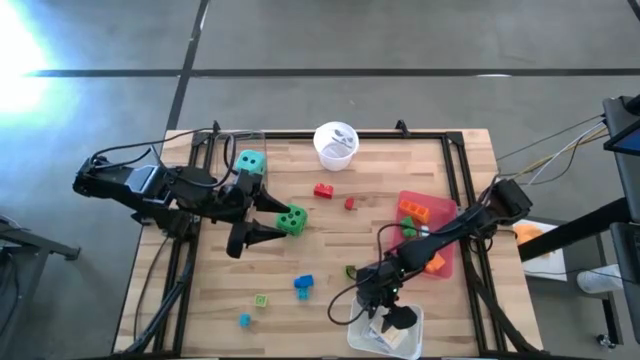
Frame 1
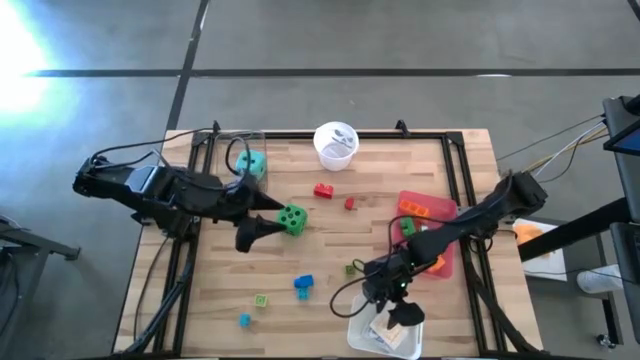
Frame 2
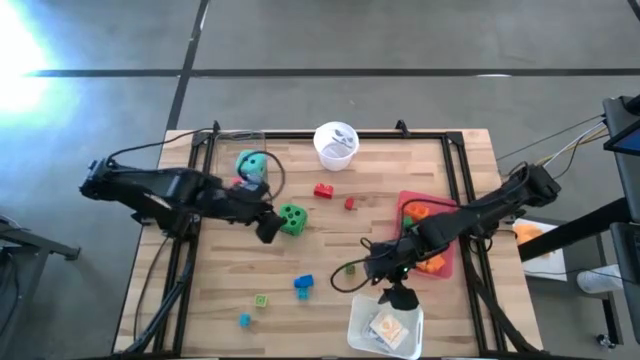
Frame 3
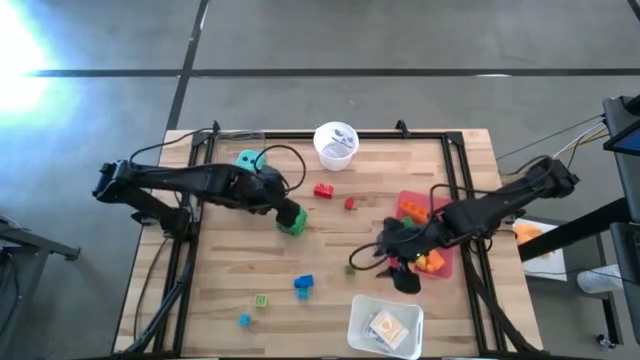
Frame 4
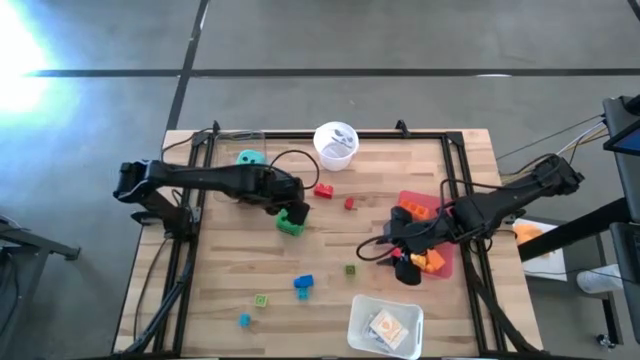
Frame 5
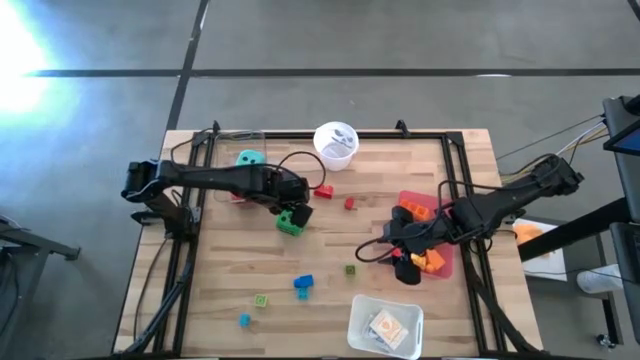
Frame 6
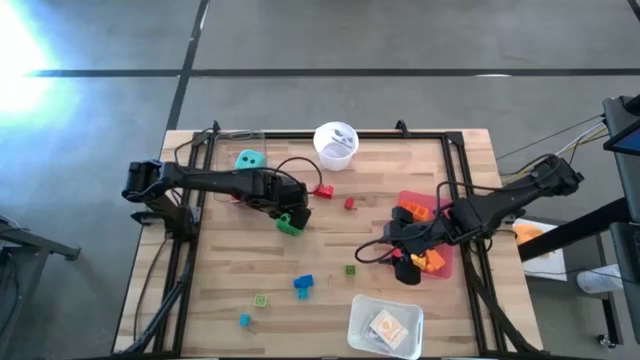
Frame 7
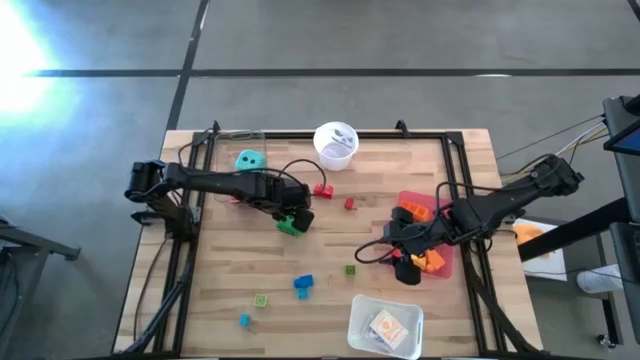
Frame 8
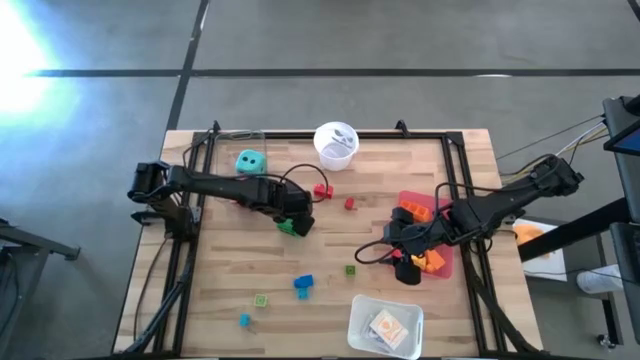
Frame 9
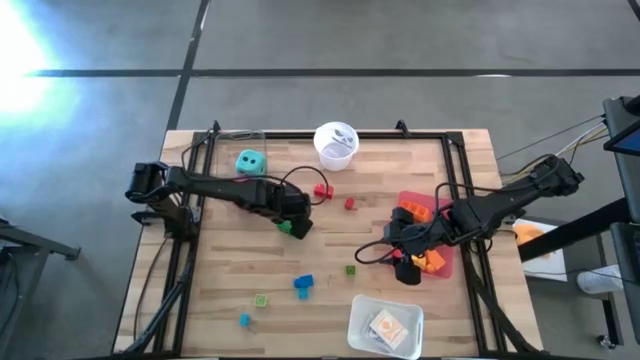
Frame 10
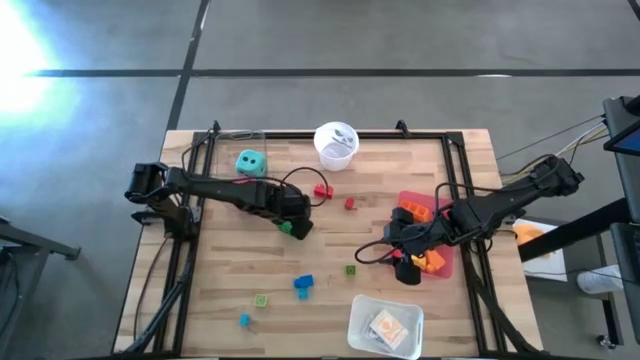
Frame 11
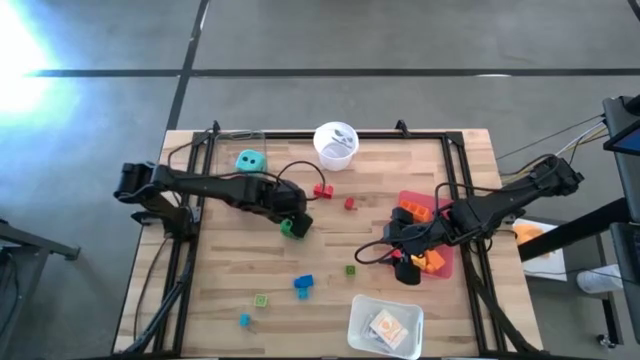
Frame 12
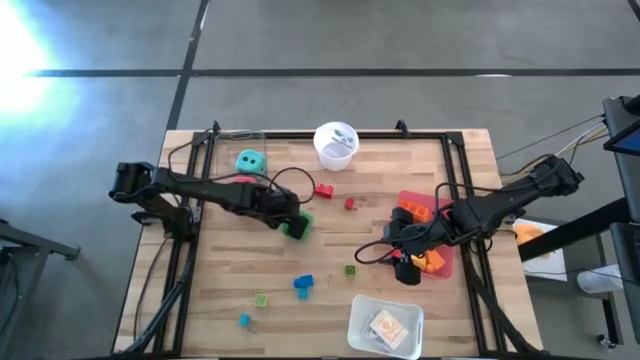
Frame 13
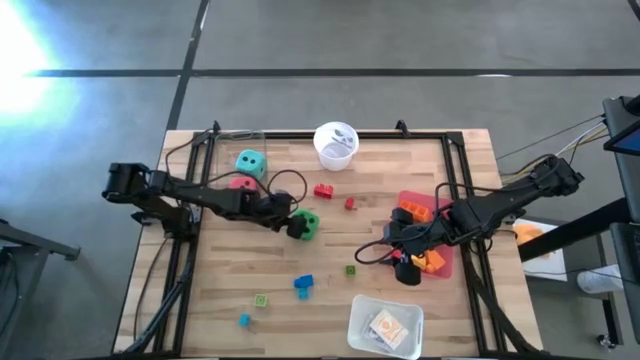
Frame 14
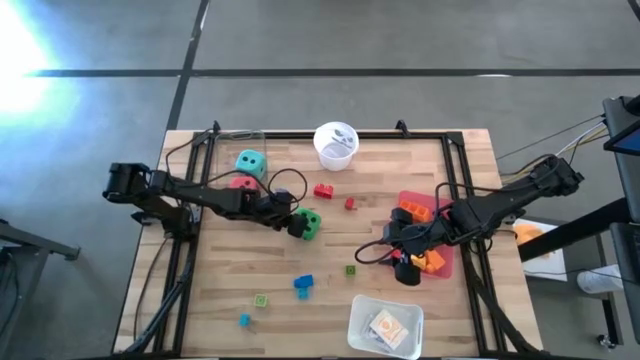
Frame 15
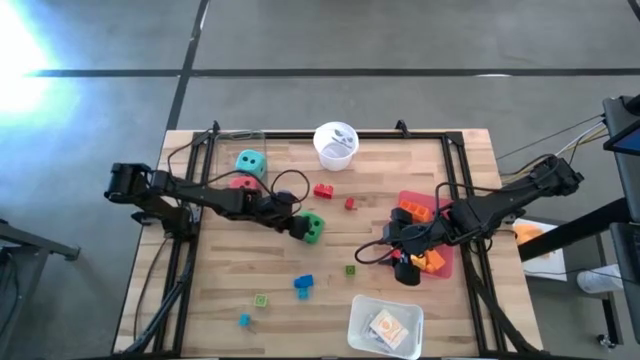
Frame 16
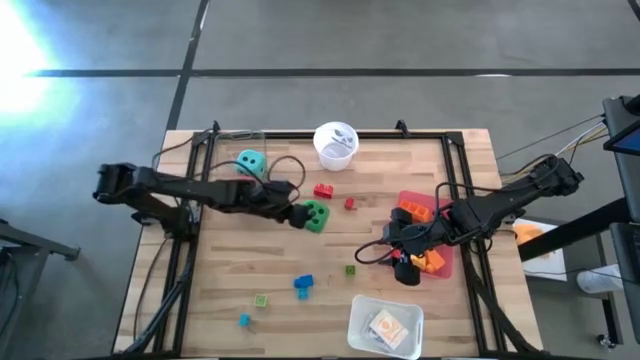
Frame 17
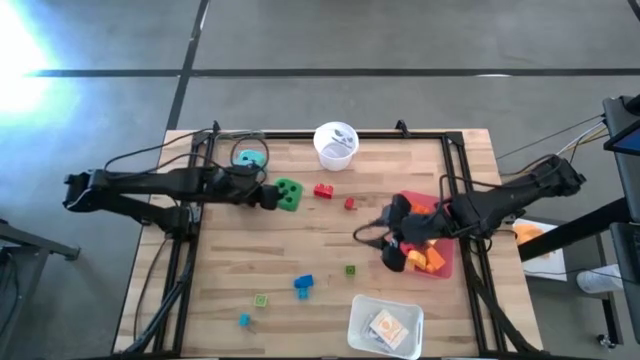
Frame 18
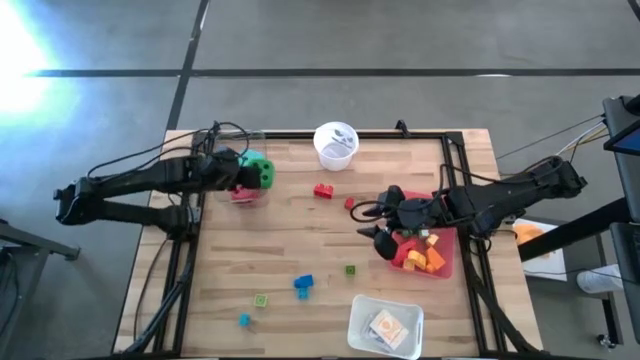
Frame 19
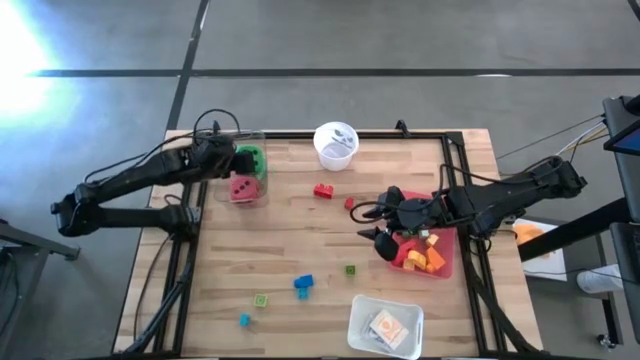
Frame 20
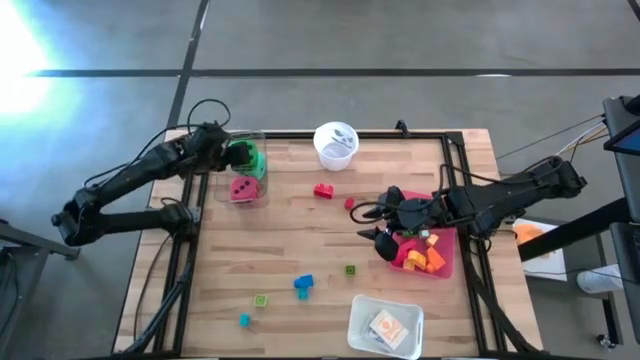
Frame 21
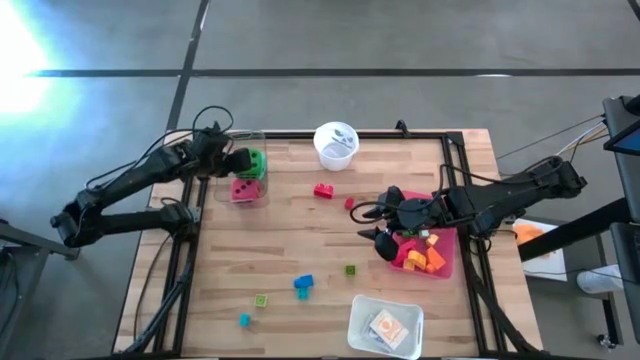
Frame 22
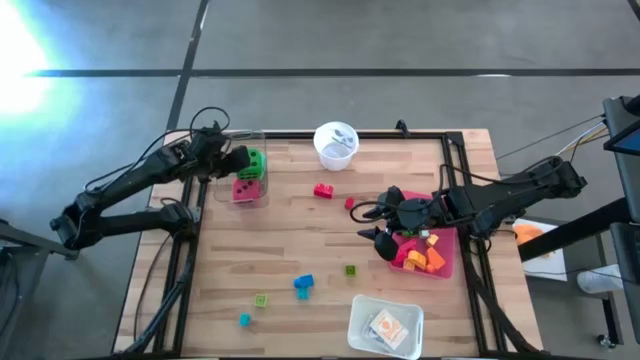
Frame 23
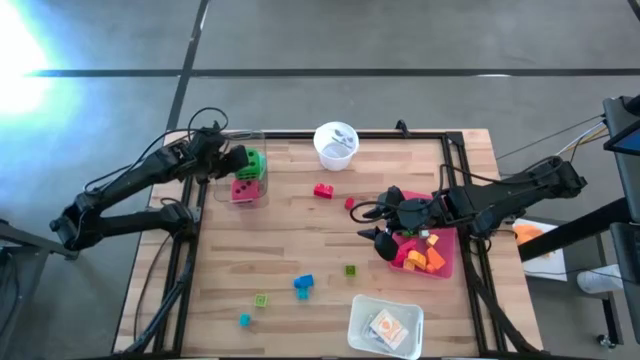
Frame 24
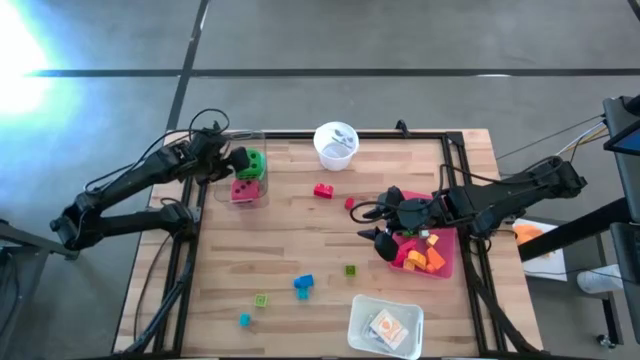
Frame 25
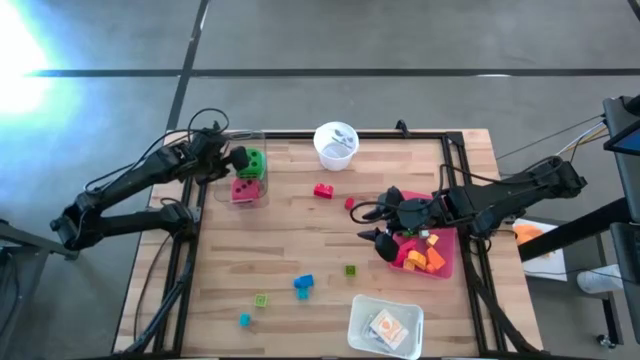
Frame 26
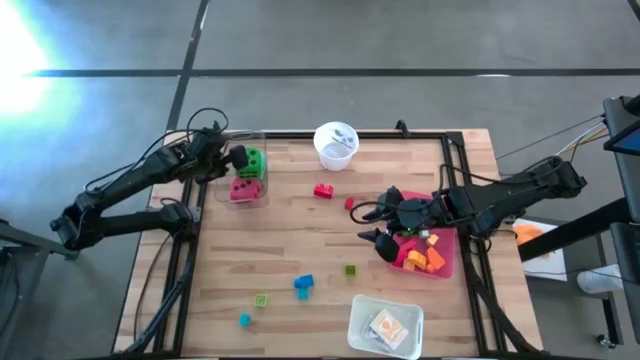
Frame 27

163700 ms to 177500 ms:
Task: Pick & Place Toys
Put the green dice into the transparent bin

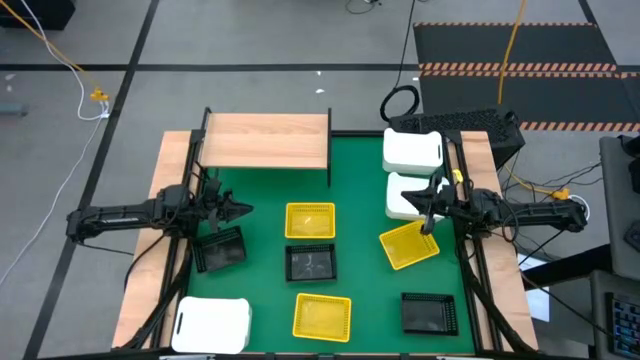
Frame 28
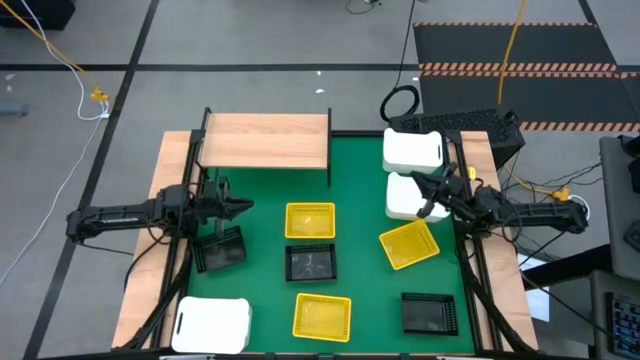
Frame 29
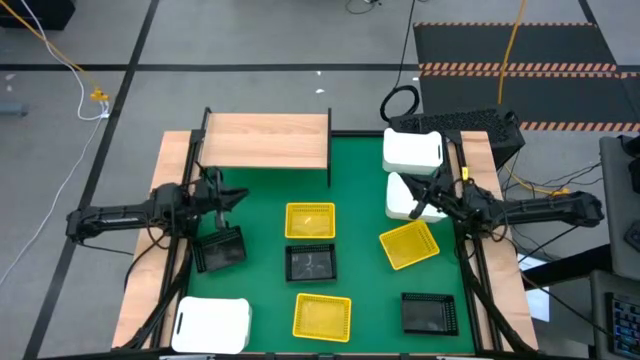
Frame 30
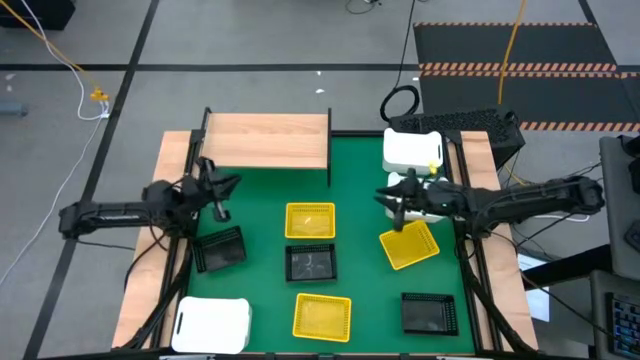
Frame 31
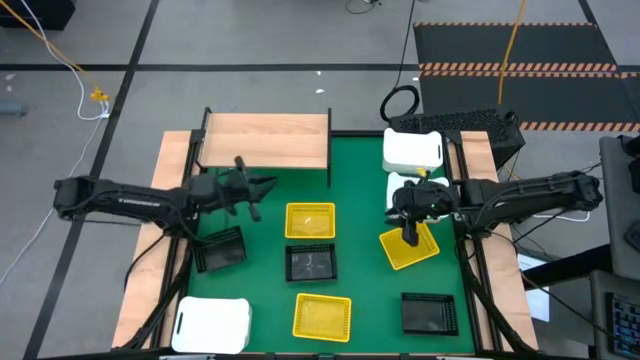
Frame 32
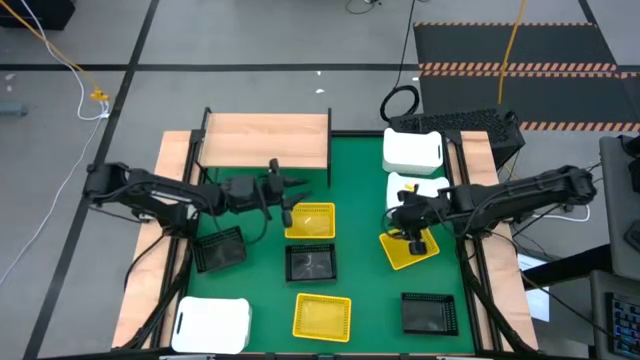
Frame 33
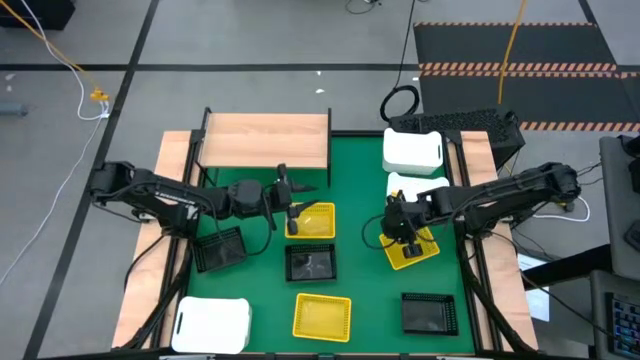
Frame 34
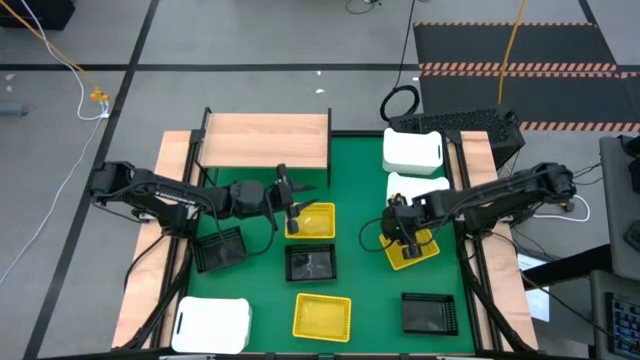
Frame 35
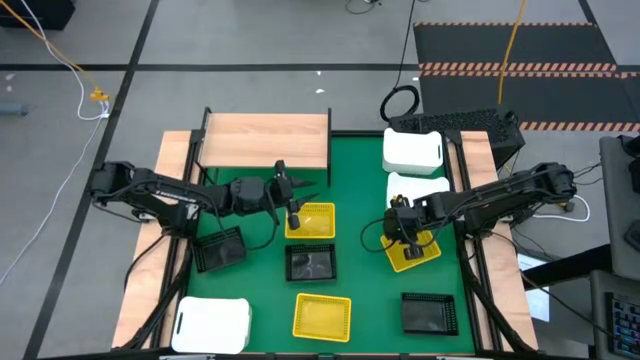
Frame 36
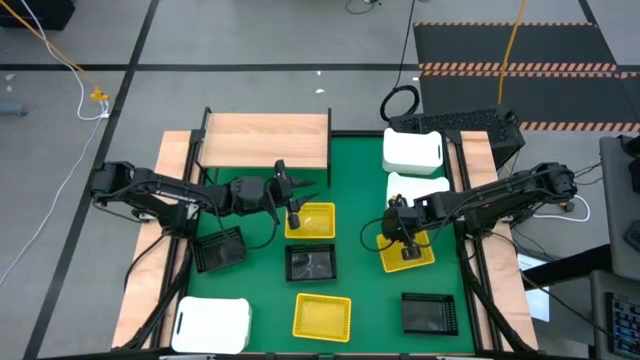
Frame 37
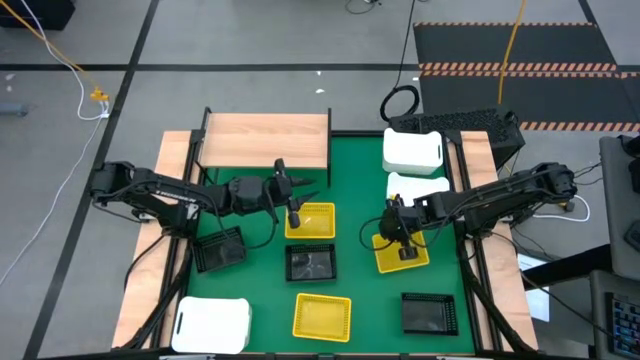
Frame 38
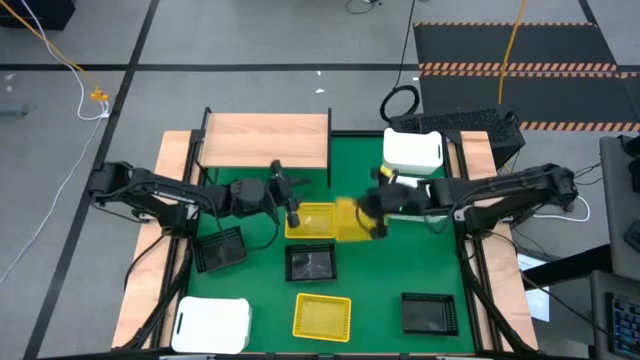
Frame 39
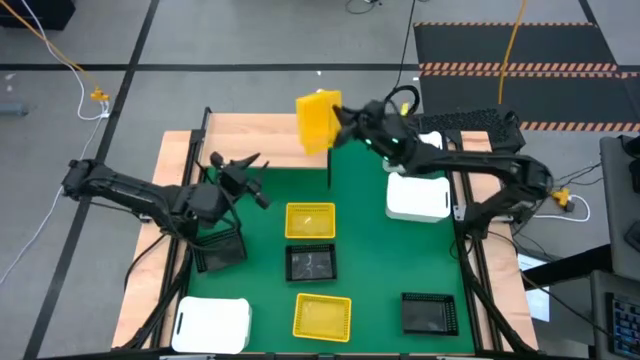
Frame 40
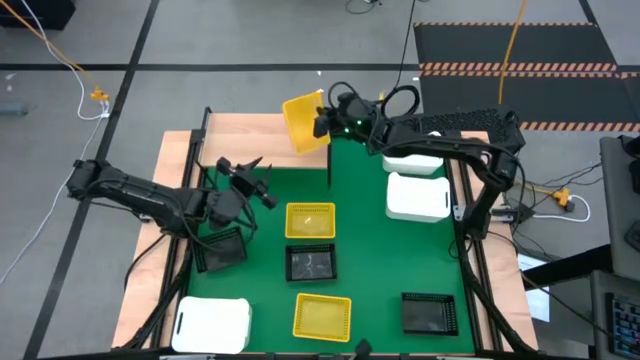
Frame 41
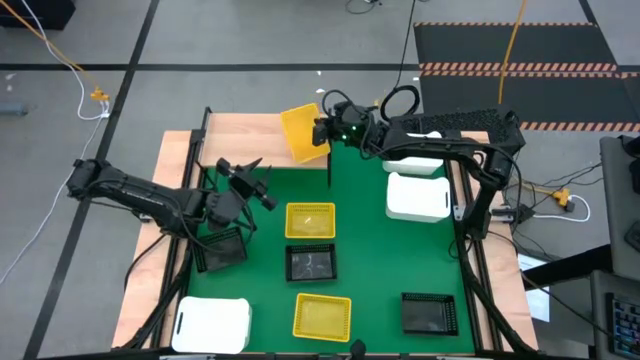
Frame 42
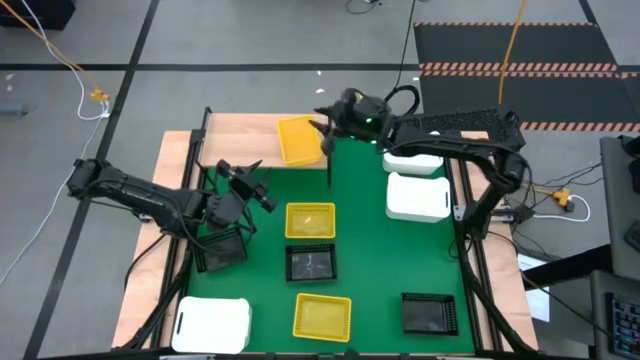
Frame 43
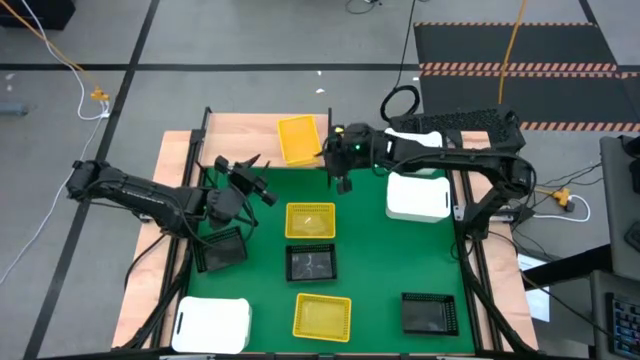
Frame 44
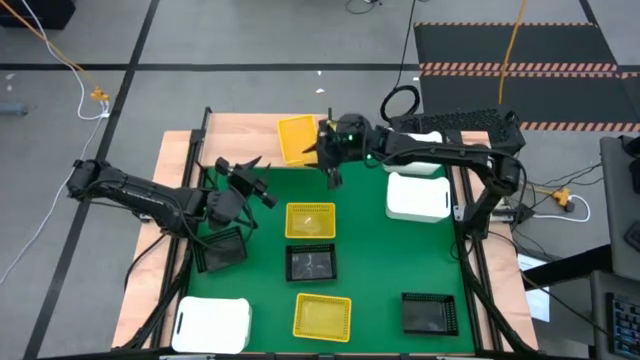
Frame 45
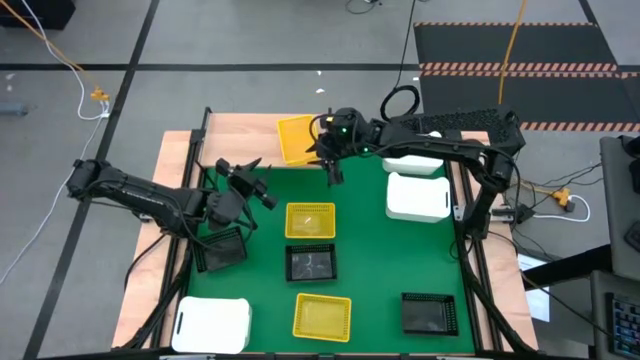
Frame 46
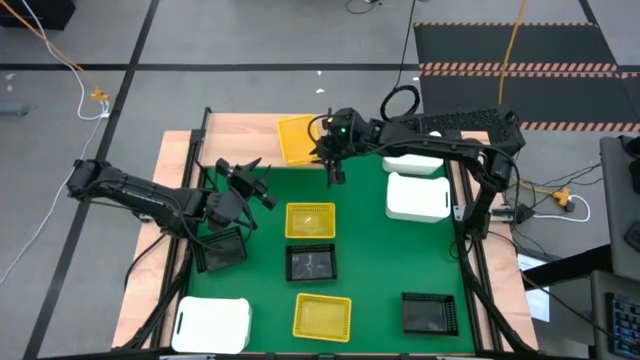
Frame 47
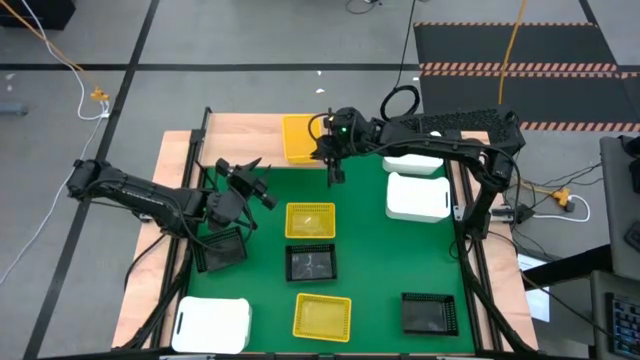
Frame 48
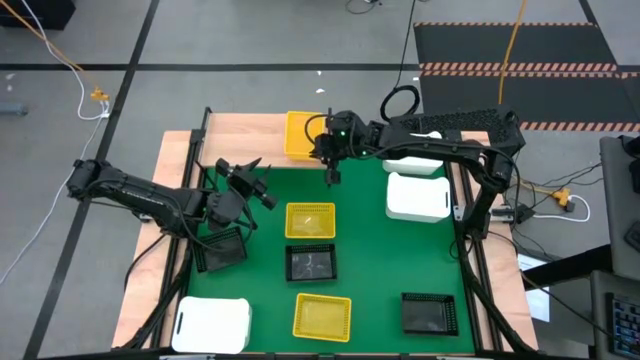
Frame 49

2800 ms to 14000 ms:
Task: Stack baskets on shelf by color
Put the middle right yellow bin on the shelf
